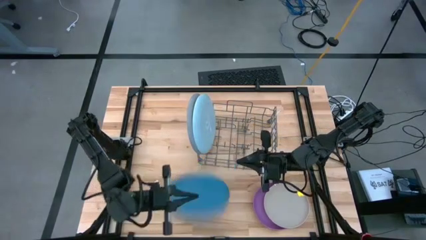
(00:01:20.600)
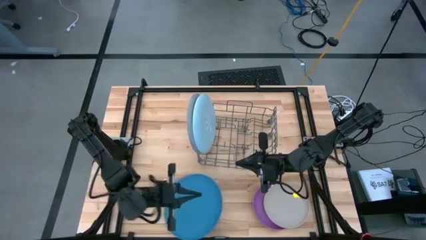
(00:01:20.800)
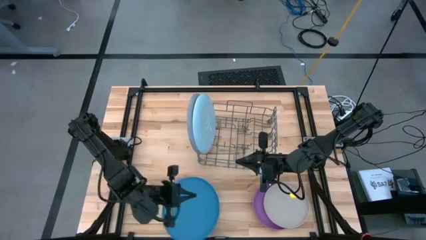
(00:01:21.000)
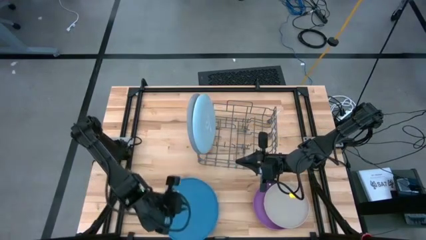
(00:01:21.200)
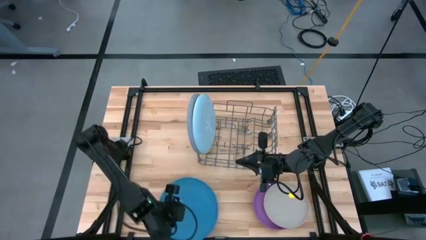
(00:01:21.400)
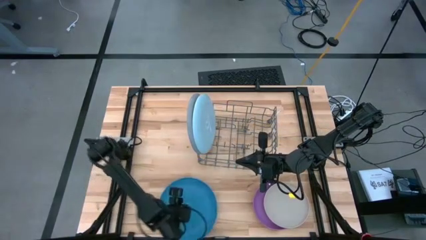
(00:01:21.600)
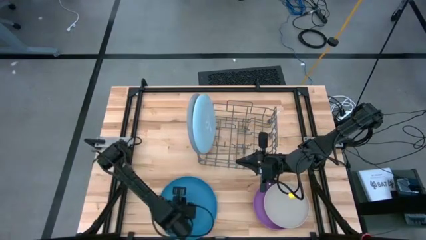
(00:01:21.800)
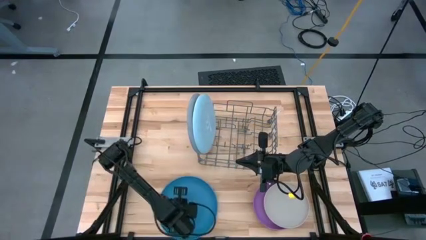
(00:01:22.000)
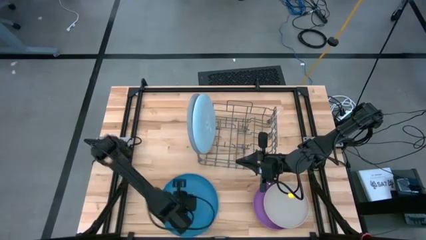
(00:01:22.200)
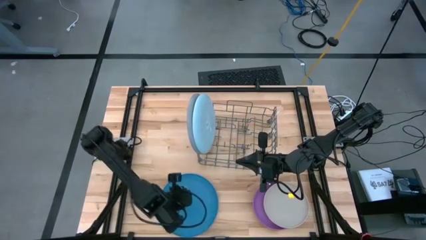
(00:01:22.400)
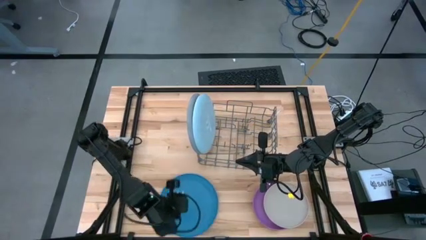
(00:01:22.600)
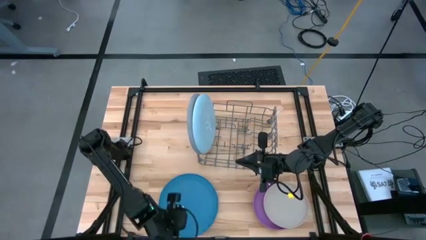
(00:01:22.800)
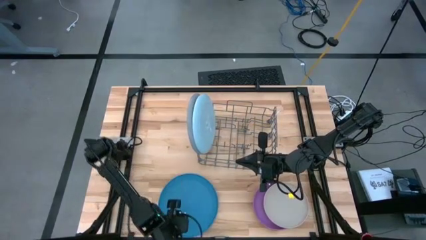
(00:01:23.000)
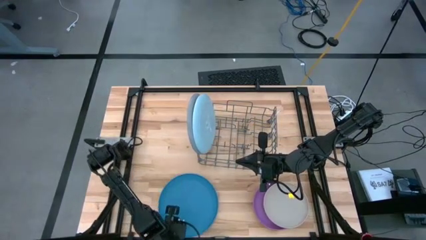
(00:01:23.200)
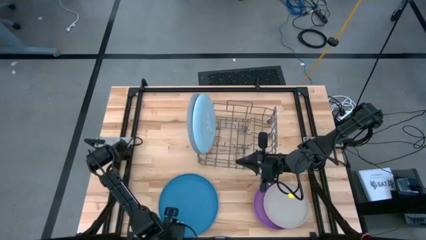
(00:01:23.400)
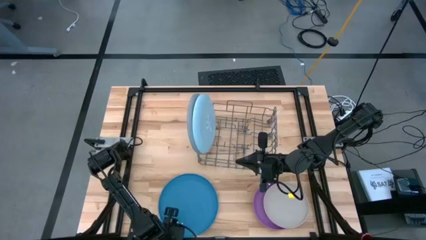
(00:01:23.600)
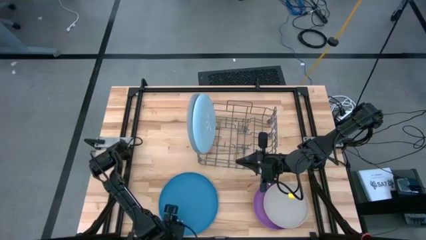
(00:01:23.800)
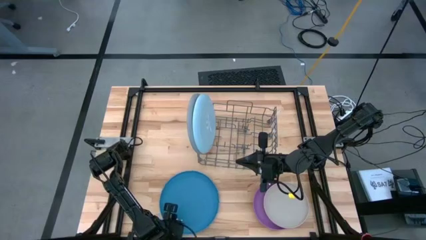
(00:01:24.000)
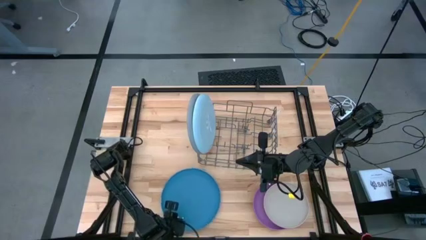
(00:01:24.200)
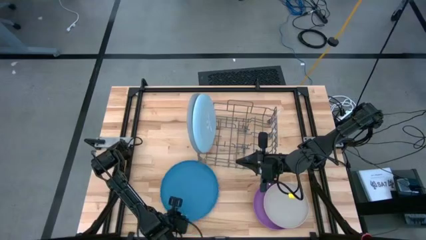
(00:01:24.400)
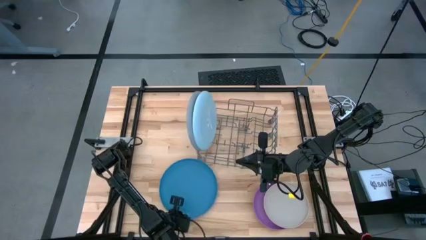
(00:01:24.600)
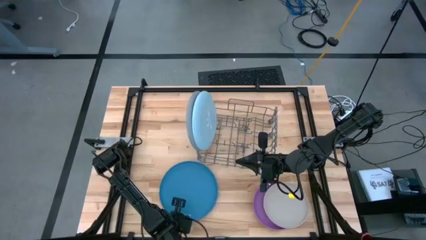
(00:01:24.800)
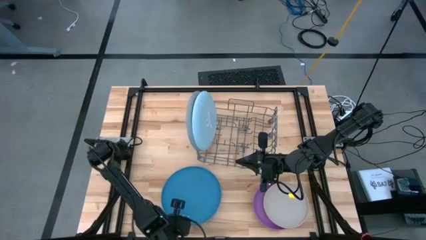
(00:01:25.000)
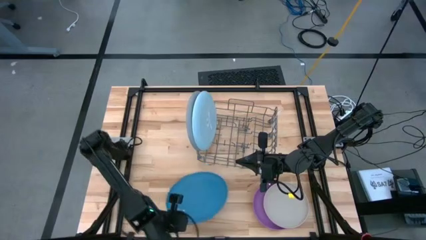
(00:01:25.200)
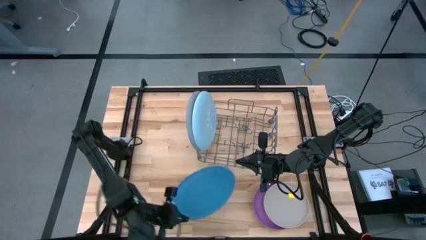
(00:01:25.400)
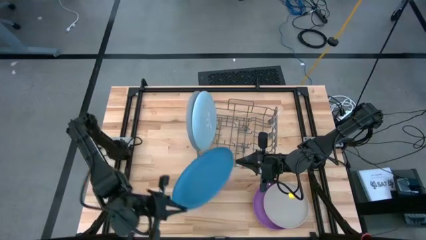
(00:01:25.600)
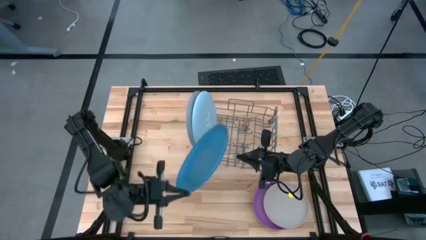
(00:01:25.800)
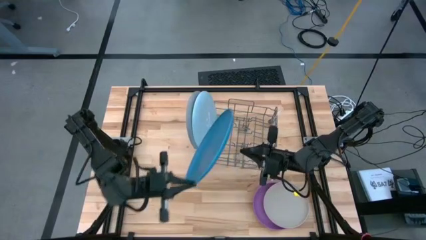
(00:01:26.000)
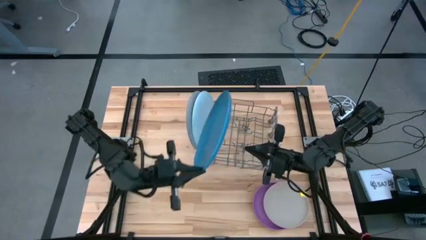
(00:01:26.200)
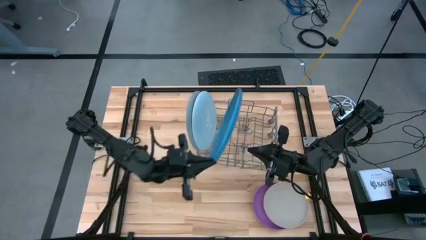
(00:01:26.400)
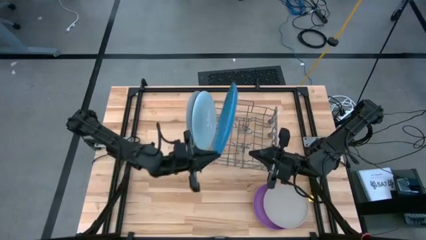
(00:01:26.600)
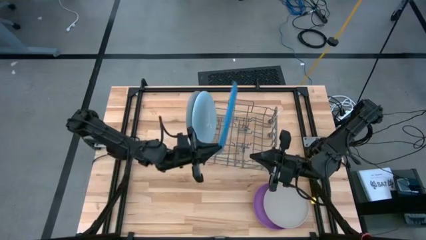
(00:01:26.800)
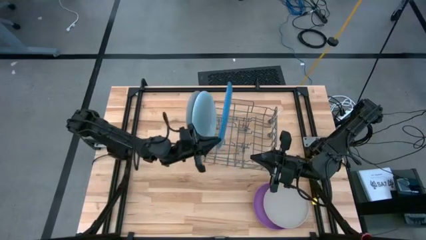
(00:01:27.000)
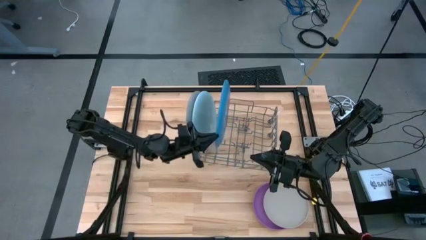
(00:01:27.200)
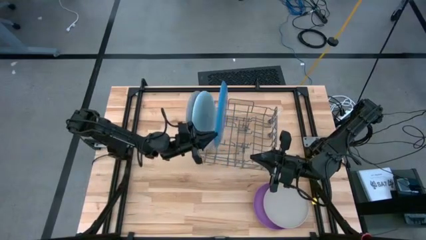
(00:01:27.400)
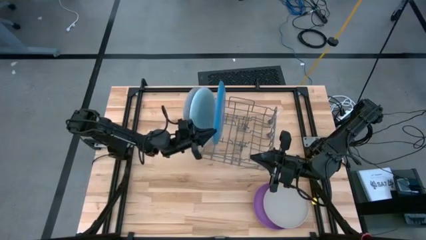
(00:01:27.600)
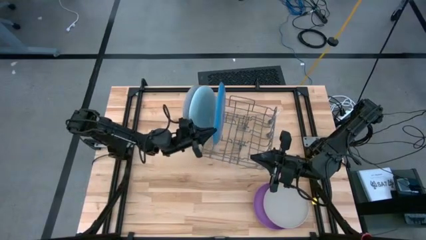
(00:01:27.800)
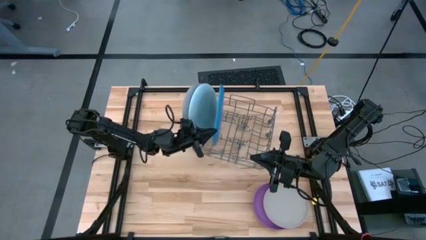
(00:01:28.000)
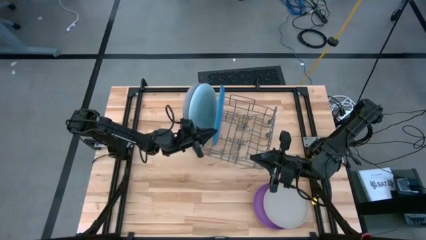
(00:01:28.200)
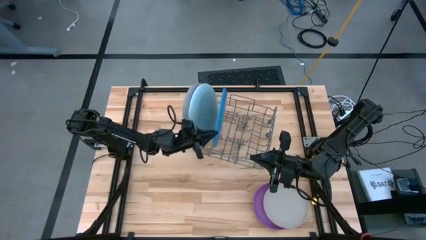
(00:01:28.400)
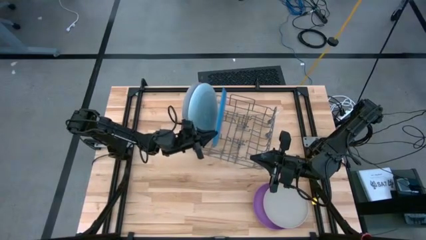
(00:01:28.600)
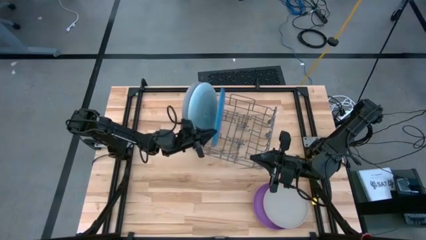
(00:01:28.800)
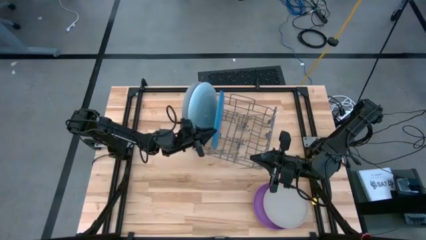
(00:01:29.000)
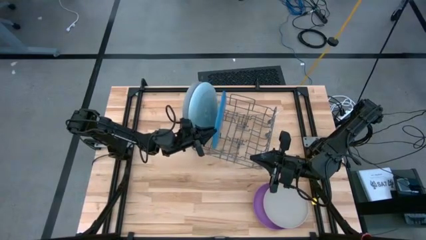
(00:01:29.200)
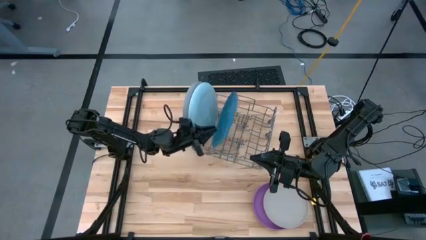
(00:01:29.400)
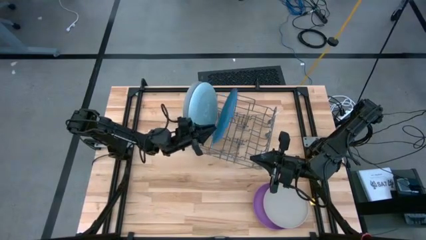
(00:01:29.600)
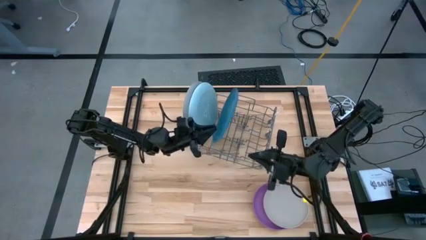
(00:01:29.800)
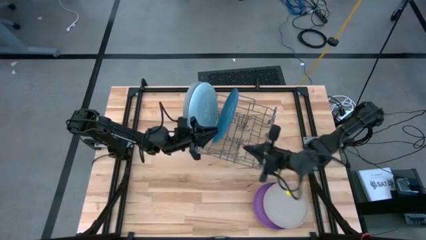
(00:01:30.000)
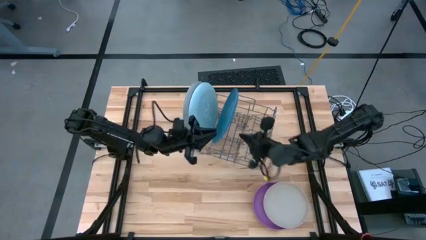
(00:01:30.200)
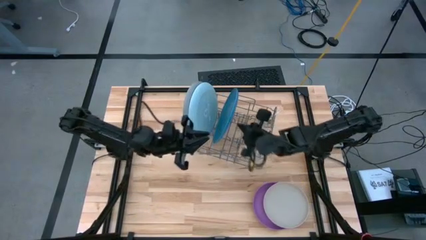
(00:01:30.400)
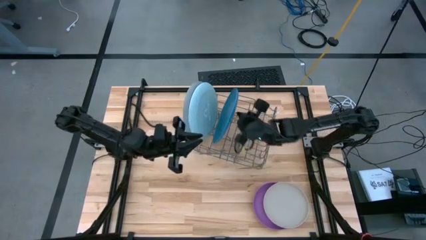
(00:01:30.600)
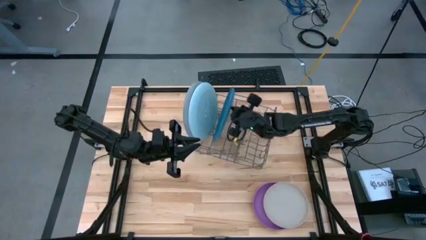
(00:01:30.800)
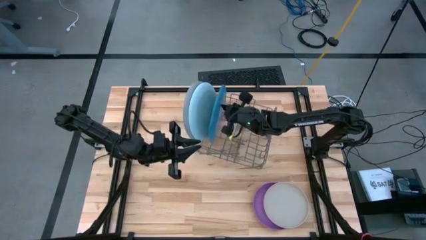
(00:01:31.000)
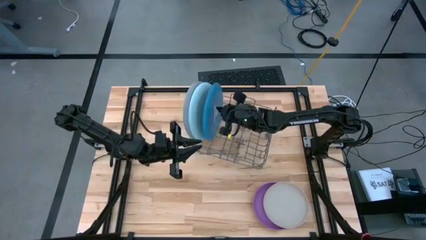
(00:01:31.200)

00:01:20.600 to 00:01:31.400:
Task: Sort dishes
Put the dark blue plate into the dish rack

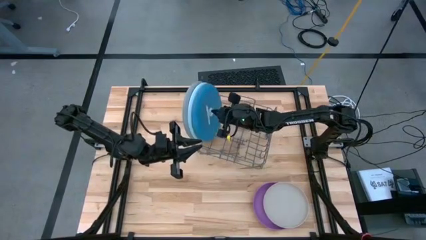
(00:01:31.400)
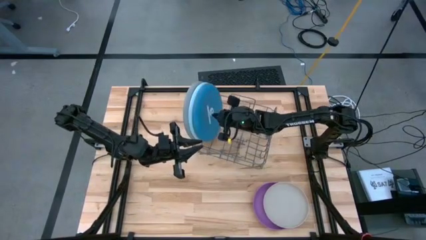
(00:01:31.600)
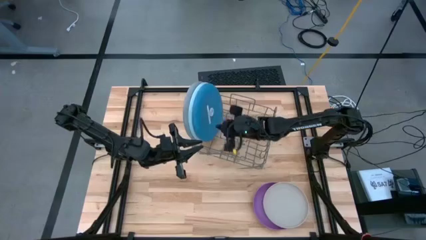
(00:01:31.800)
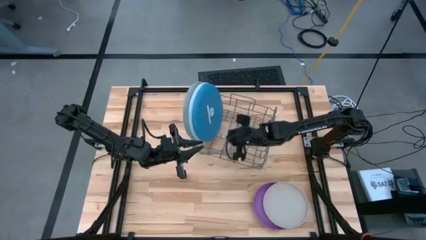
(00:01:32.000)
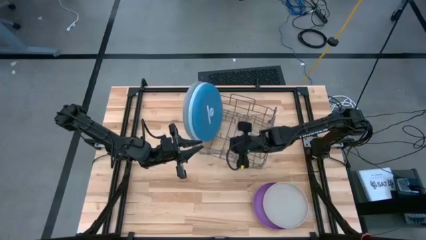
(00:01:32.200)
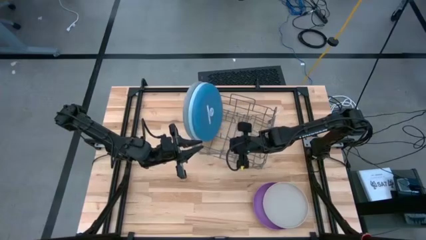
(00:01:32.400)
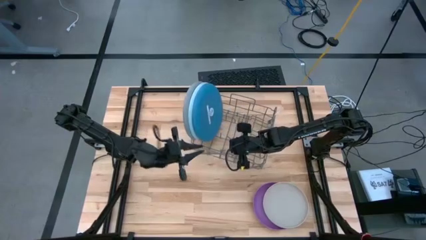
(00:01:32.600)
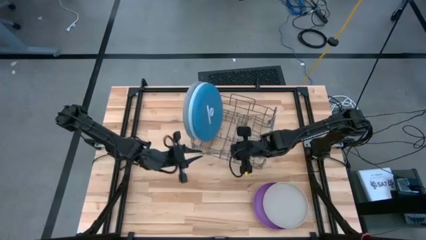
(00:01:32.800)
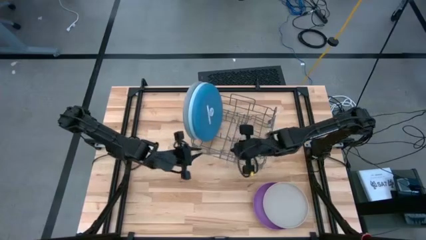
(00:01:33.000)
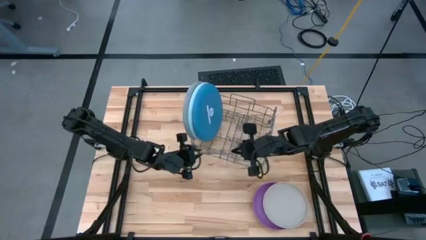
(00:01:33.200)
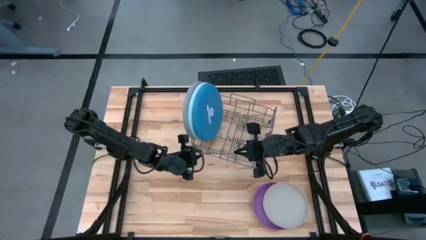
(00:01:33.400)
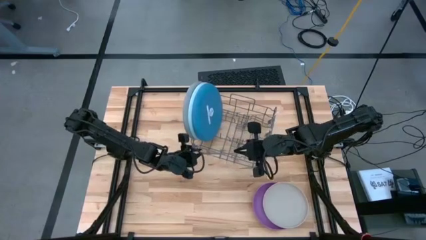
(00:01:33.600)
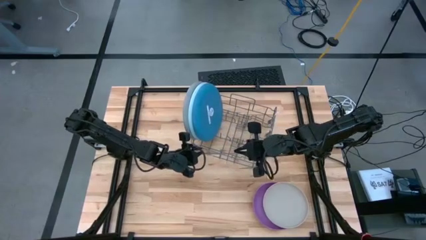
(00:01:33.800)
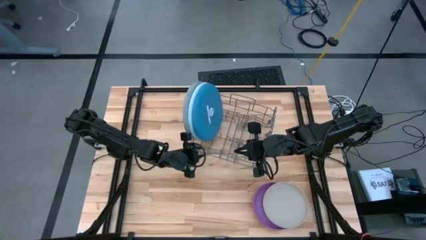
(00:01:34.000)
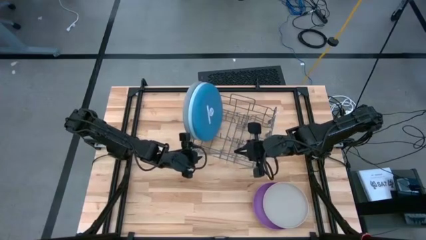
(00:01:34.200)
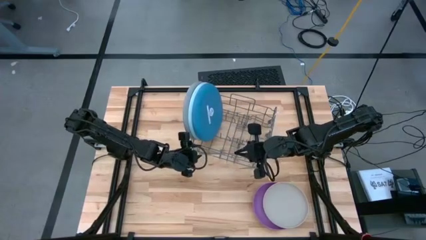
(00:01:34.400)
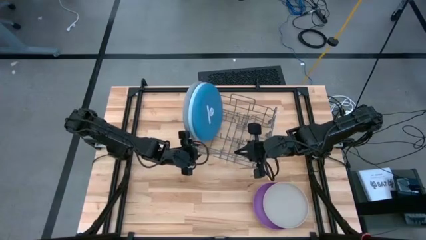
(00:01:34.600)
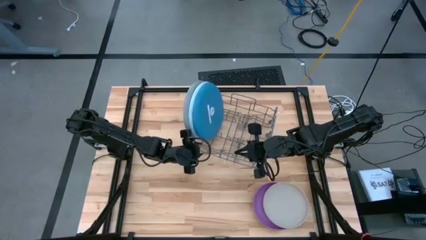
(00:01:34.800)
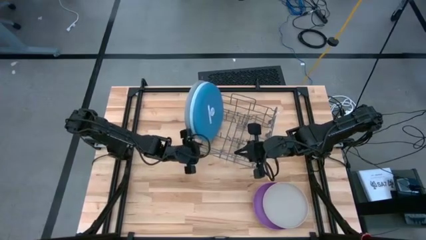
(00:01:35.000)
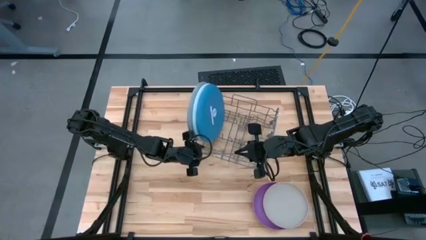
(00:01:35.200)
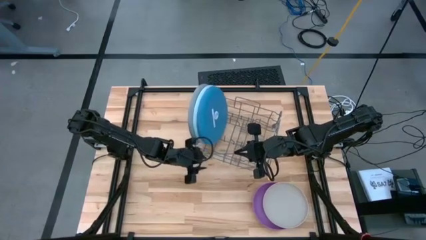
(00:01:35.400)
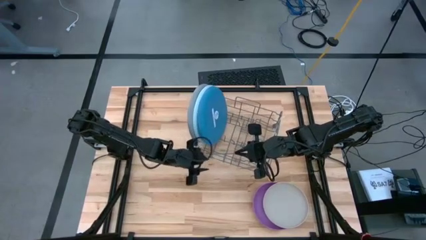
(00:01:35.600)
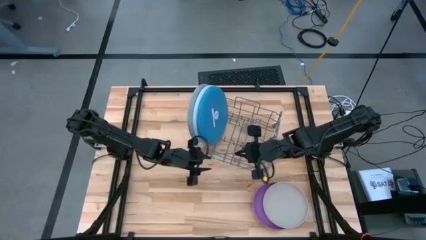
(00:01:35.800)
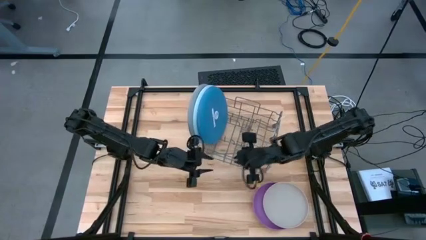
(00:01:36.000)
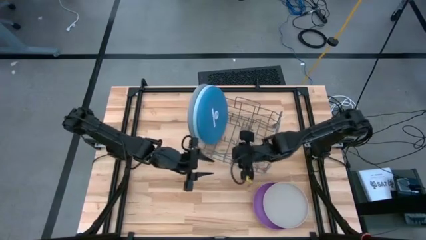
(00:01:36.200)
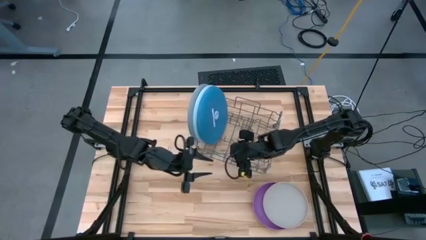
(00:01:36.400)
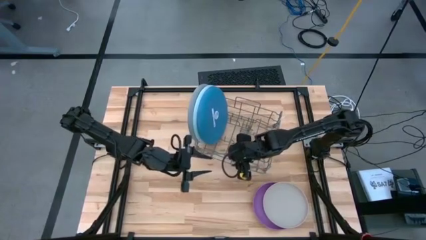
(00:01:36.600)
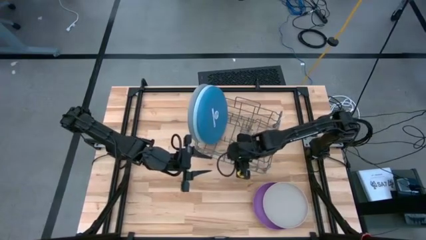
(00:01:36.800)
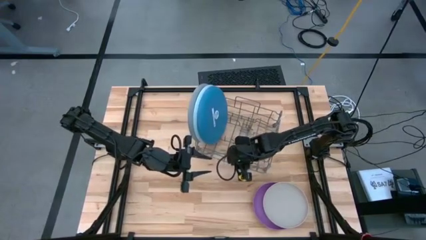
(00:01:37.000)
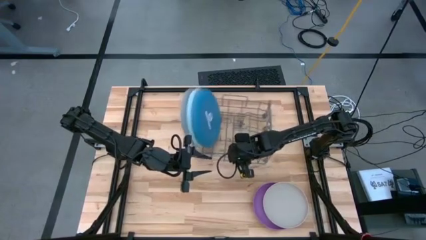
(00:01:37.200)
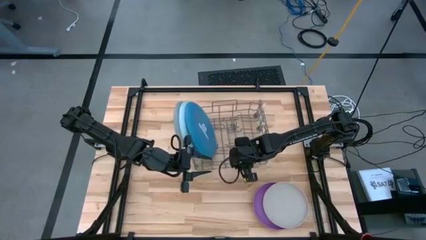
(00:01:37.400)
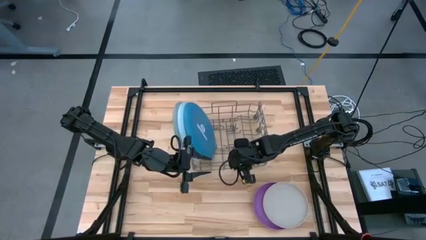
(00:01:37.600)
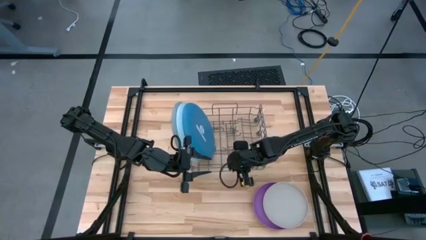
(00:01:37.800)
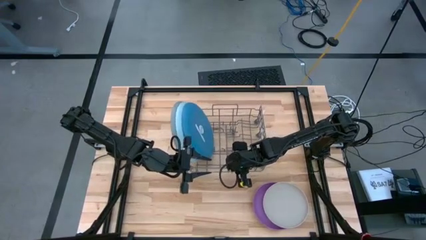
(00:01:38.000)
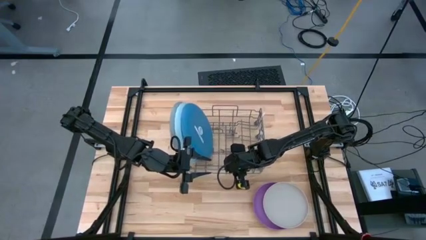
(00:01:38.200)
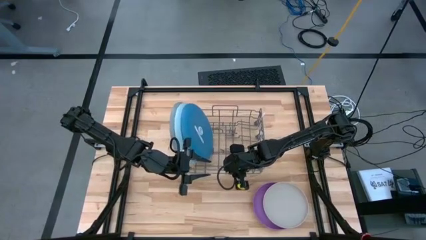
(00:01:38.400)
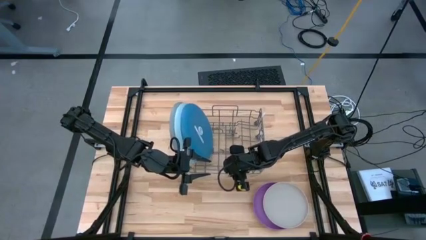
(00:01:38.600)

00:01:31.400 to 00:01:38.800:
Adjust the dish rack
